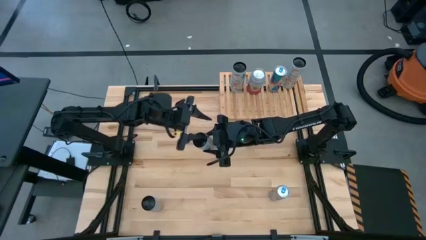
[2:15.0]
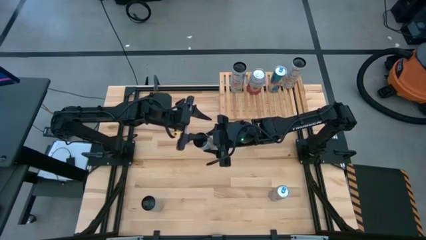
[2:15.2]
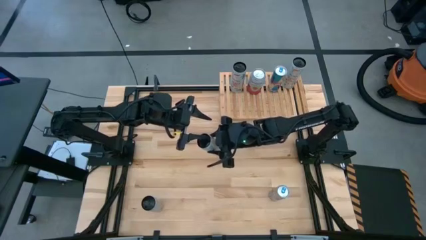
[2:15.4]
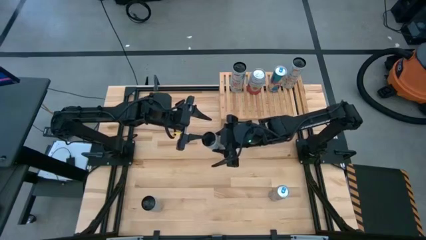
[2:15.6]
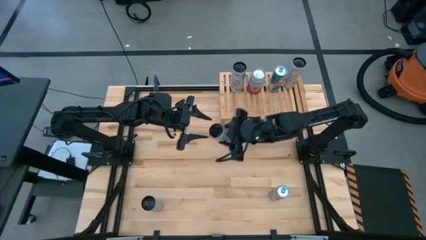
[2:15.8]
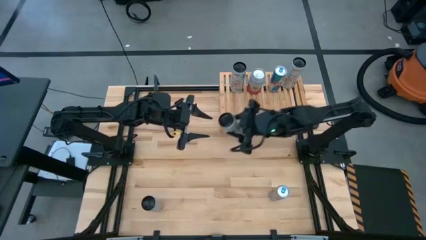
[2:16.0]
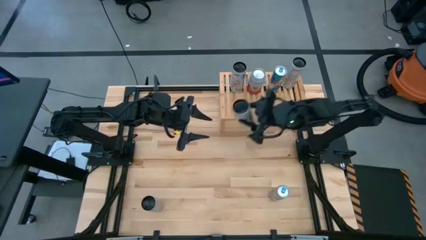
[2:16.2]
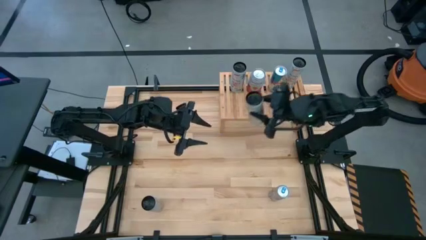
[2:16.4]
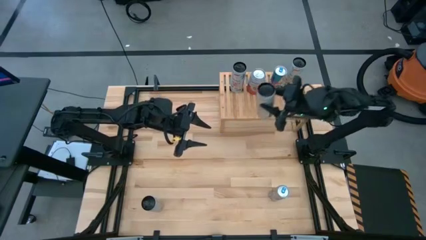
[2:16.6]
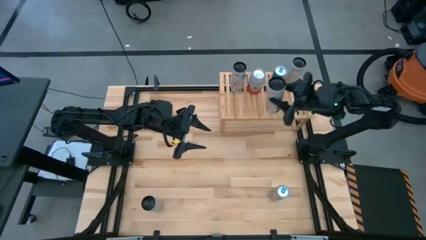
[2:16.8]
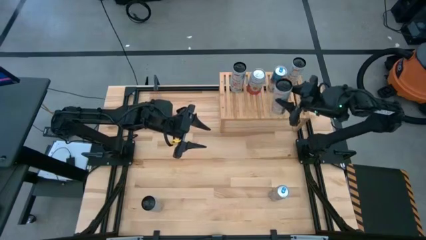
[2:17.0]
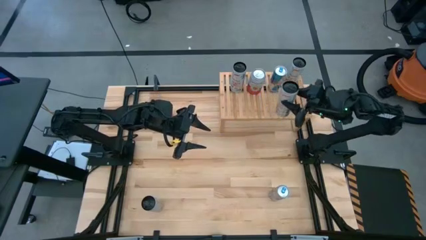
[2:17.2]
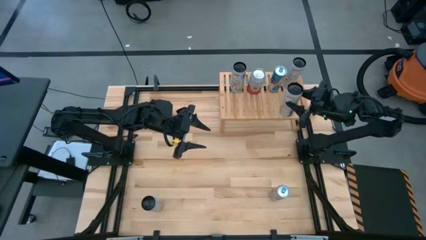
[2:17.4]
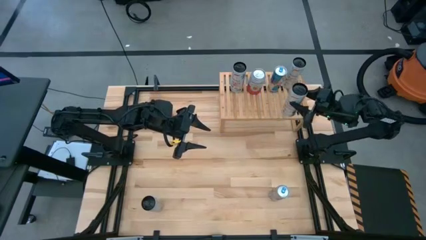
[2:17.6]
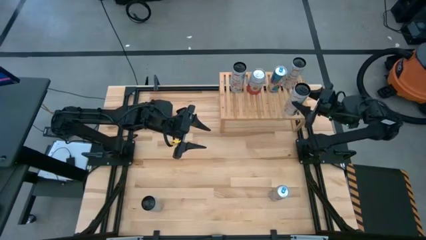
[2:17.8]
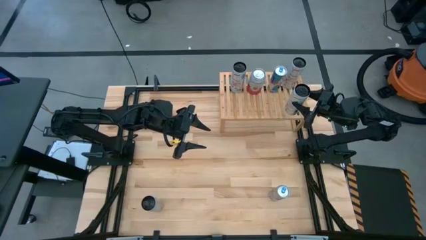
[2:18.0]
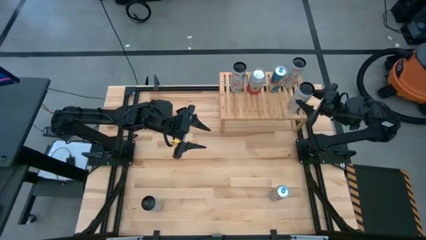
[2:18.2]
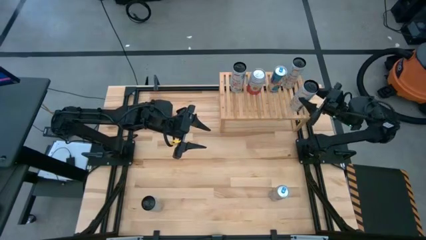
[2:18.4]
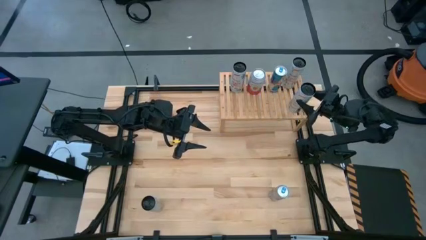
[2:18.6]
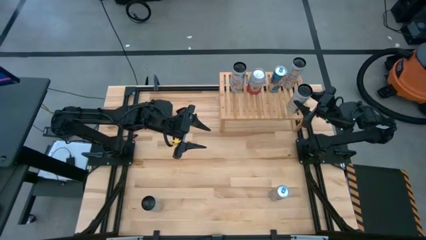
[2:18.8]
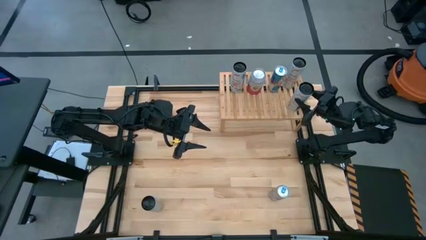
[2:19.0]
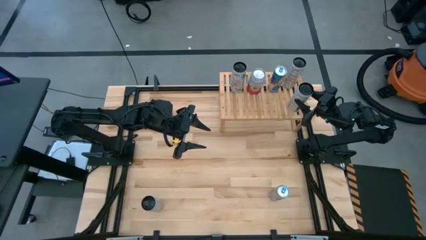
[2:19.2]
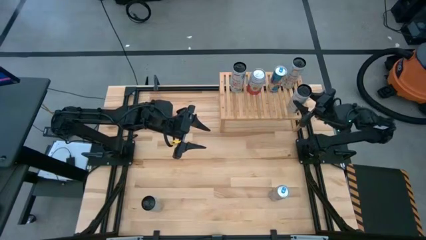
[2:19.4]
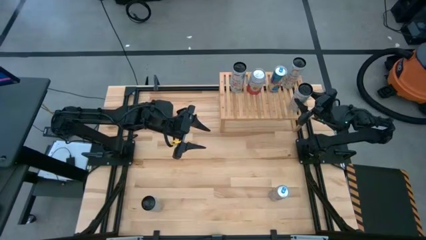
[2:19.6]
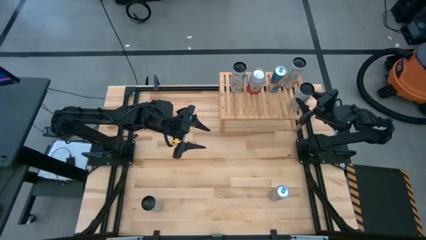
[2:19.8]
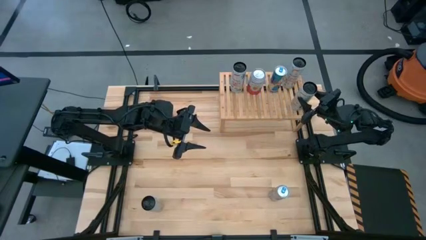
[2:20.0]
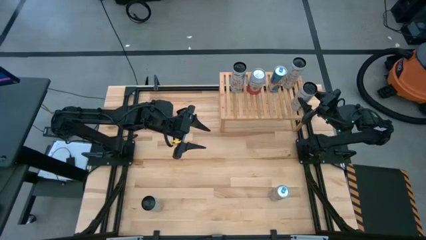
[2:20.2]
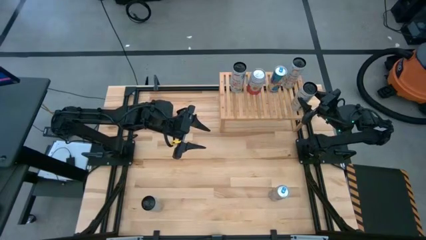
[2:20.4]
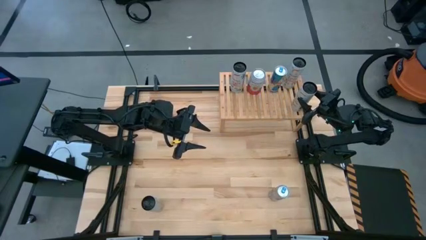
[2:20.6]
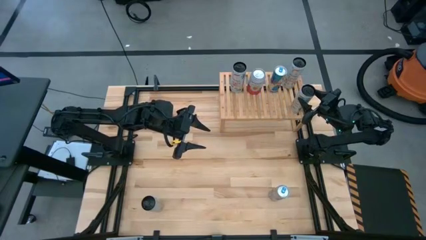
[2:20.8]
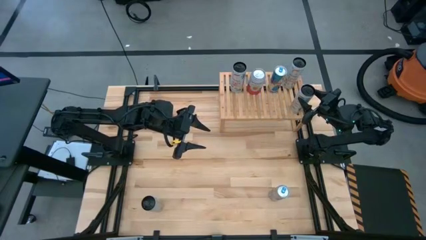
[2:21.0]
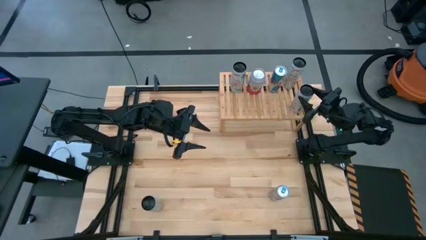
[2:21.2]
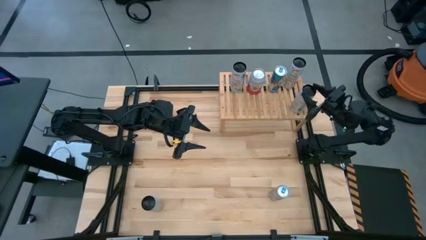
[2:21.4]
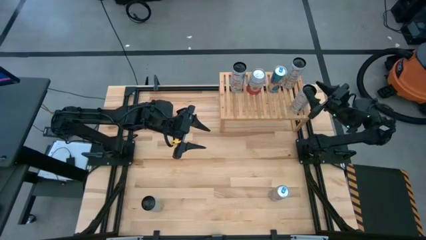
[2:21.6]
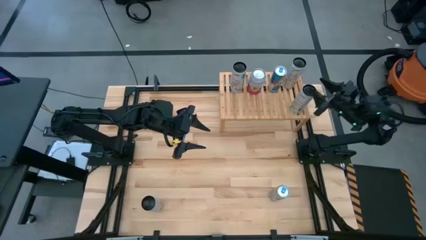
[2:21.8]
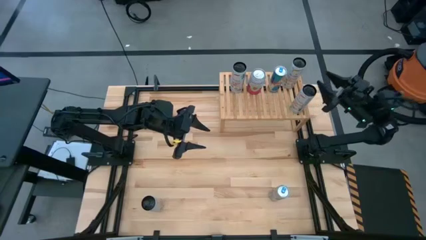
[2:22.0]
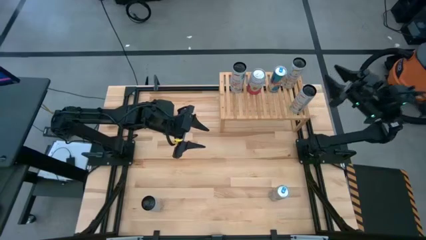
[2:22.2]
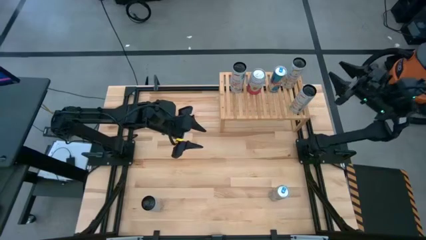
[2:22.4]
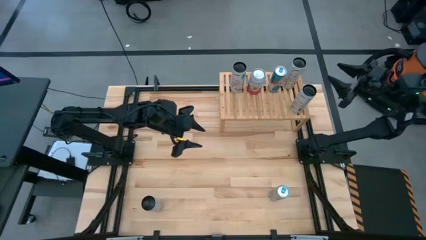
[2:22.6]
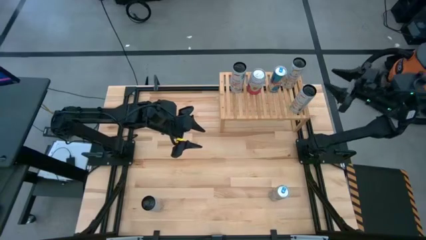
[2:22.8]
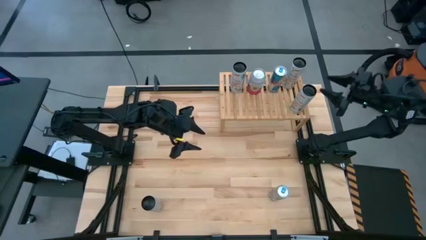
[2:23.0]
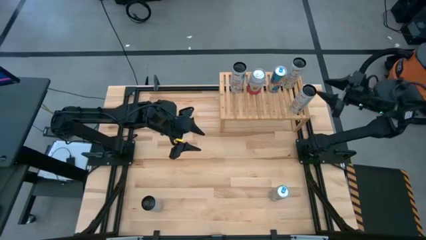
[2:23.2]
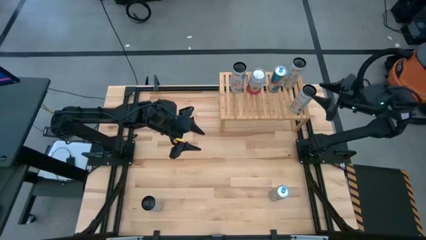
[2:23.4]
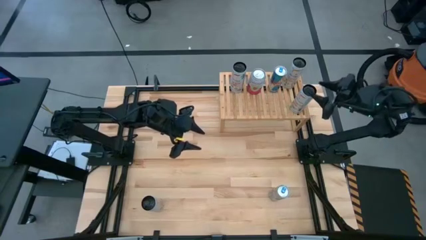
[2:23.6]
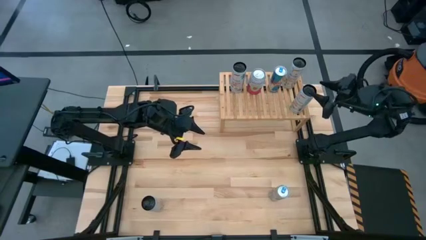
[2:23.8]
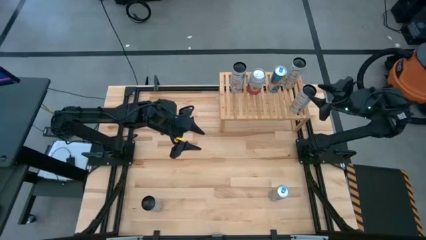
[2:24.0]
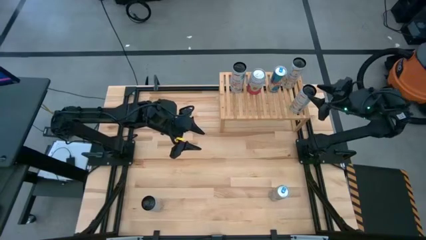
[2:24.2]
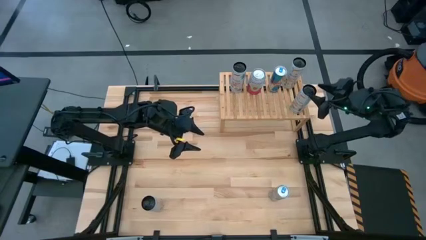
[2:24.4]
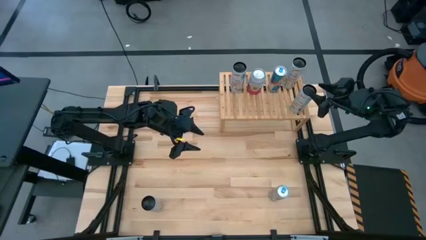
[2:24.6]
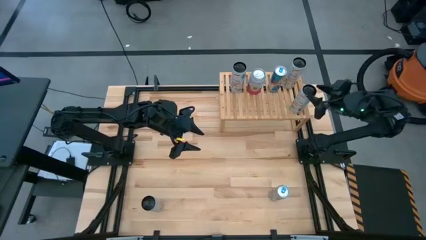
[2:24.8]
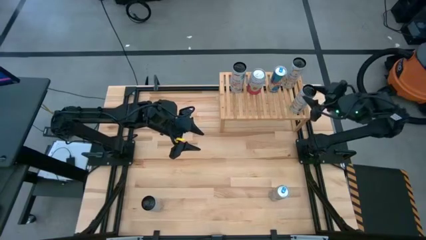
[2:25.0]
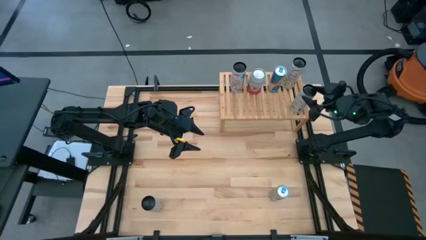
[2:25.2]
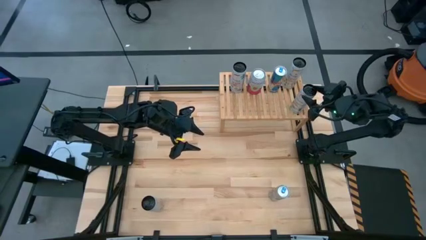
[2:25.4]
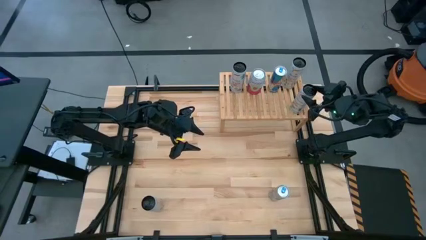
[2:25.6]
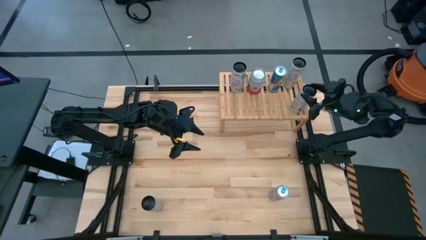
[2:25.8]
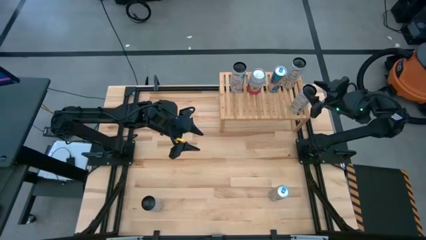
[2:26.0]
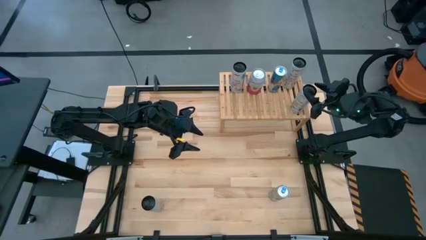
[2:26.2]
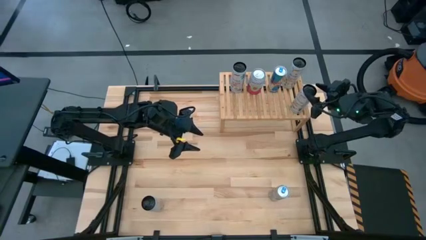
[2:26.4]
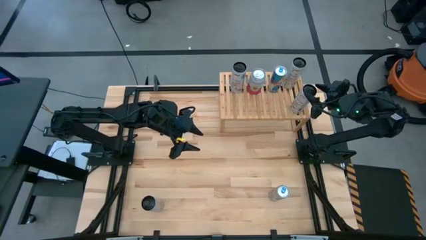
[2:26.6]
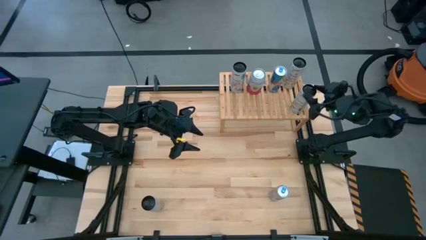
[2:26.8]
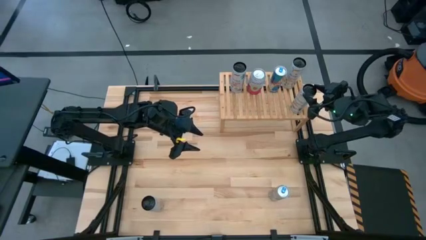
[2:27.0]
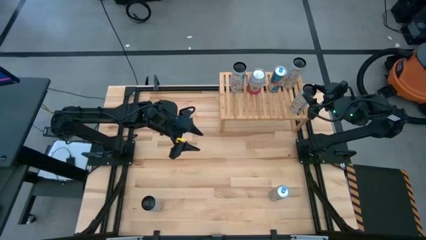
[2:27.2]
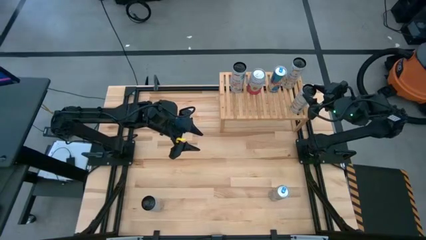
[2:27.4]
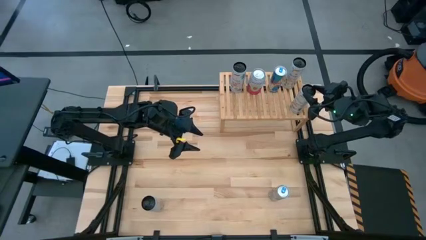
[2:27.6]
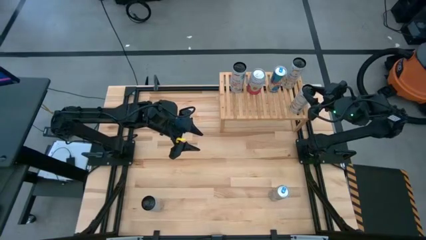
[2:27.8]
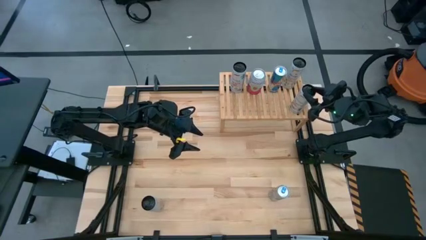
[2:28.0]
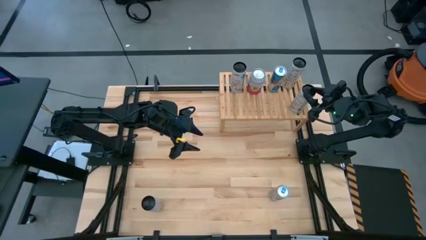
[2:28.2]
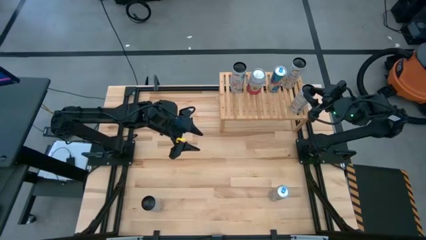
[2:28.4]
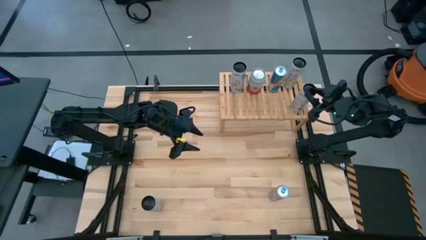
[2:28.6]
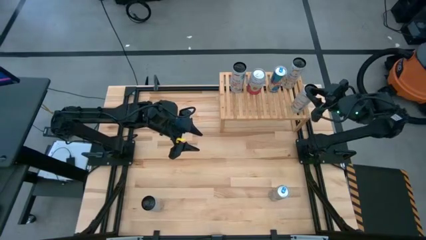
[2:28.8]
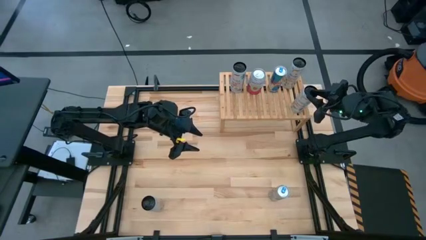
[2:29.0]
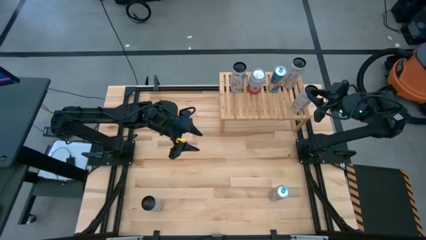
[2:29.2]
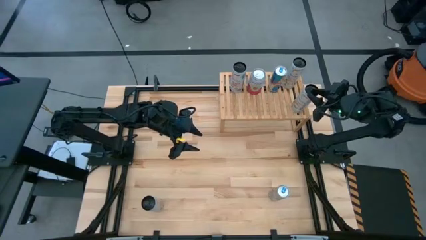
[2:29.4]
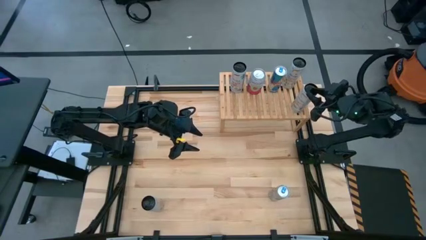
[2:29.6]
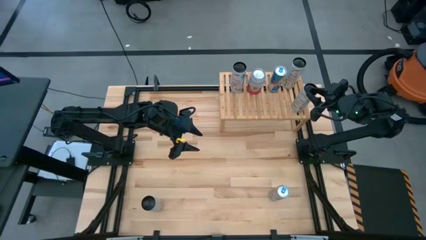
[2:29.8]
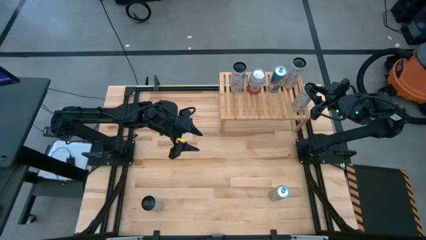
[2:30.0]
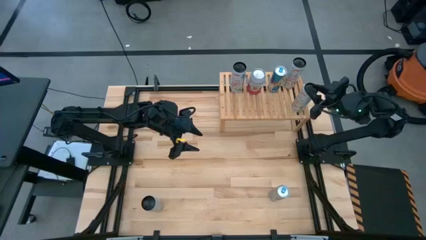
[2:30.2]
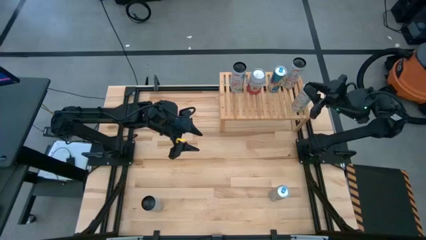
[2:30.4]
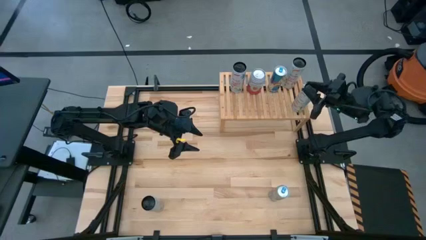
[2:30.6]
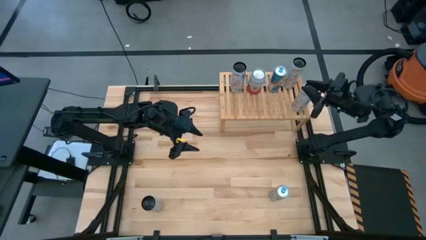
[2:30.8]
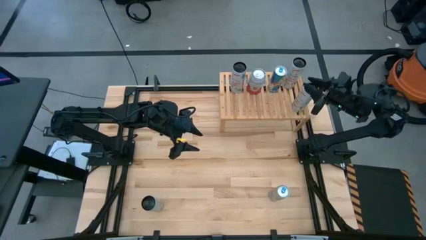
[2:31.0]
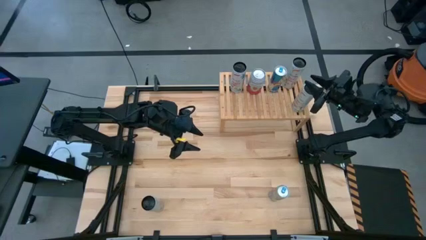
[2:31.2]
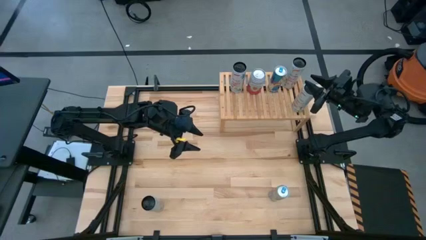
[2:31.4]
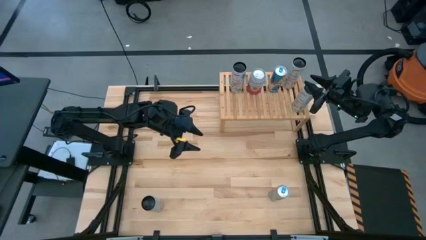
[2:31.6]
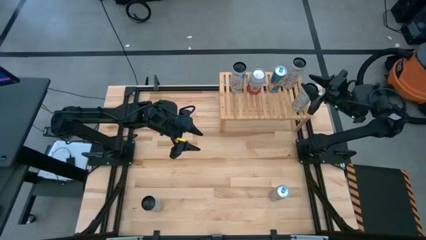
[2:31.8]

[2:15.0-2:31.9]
Task: Place canned beverage on shelf
Put the top white-yellow soda can on the shelf aligned with the other white-yellow soda can
